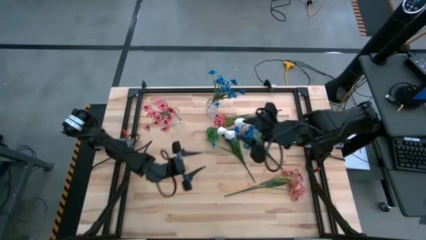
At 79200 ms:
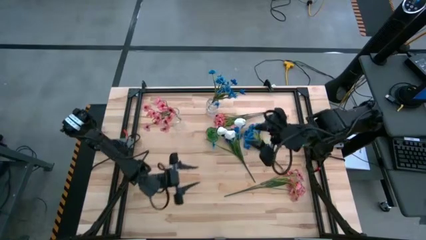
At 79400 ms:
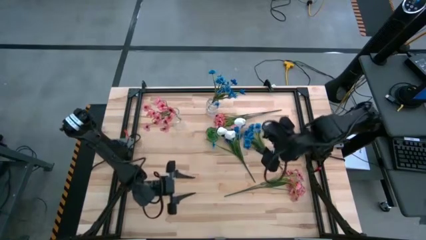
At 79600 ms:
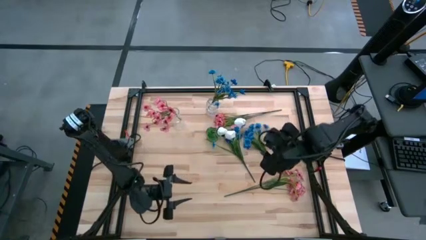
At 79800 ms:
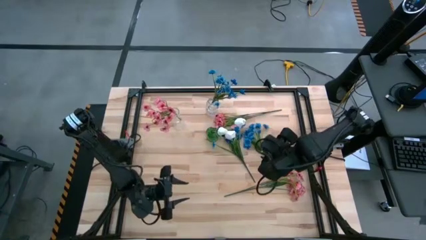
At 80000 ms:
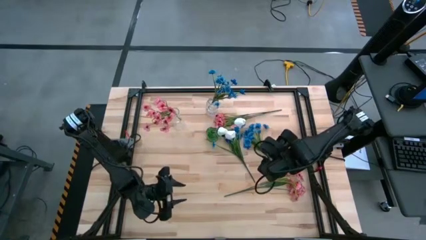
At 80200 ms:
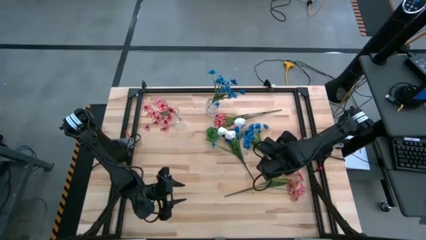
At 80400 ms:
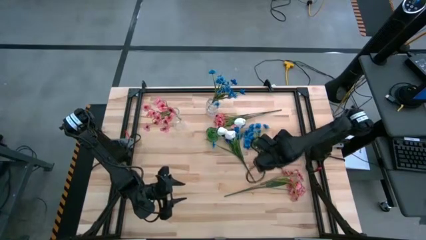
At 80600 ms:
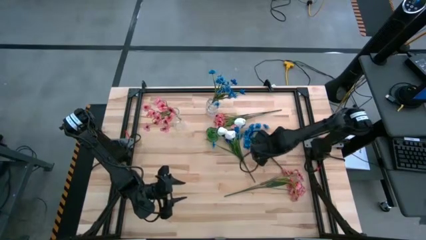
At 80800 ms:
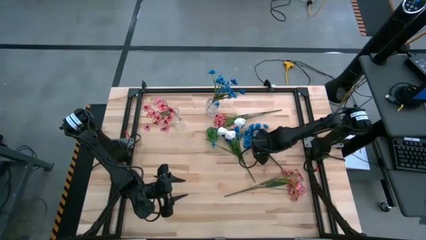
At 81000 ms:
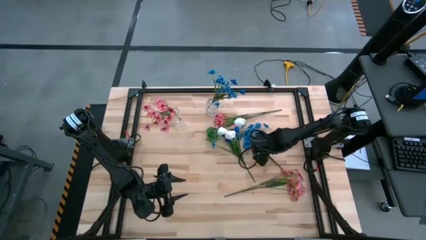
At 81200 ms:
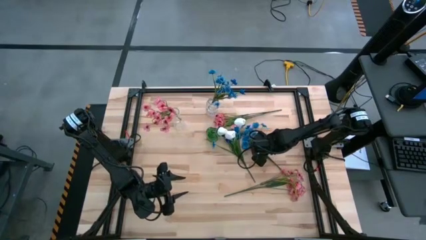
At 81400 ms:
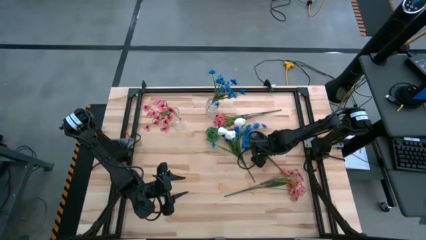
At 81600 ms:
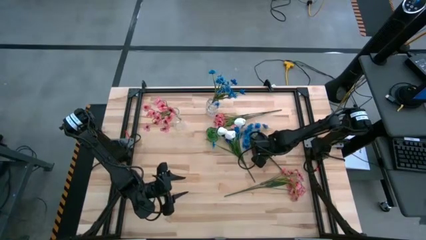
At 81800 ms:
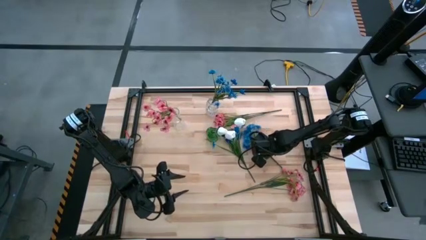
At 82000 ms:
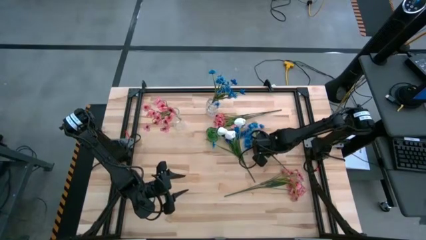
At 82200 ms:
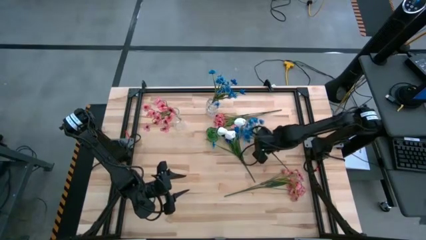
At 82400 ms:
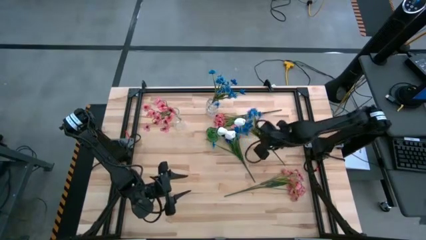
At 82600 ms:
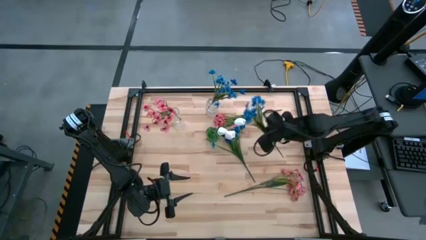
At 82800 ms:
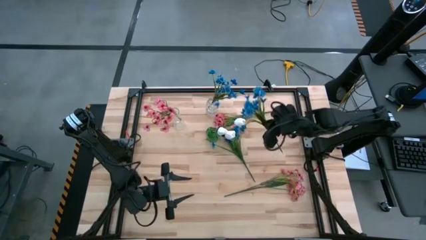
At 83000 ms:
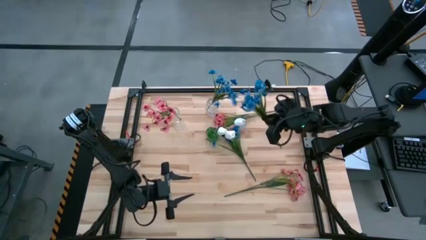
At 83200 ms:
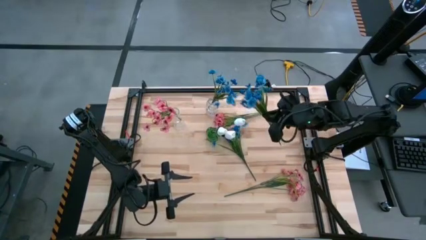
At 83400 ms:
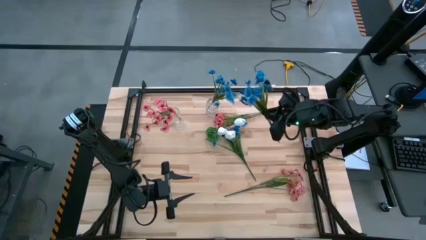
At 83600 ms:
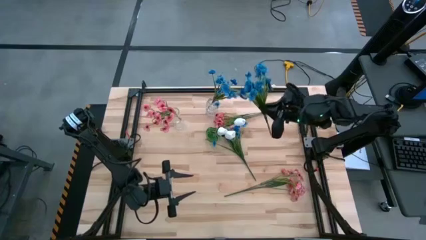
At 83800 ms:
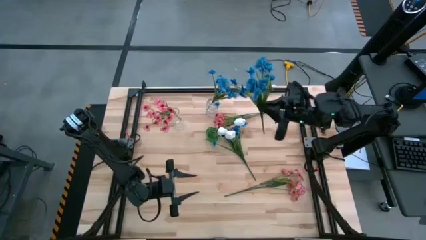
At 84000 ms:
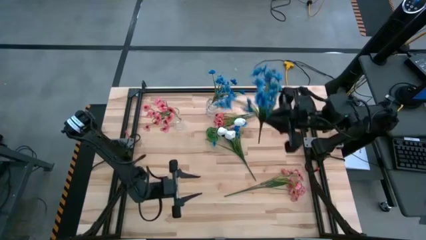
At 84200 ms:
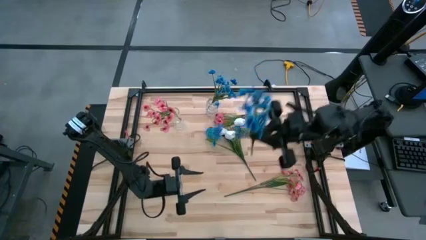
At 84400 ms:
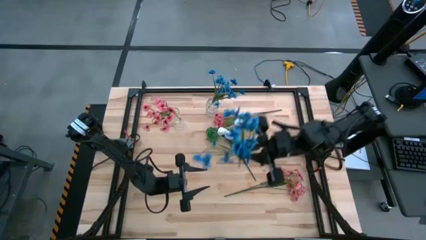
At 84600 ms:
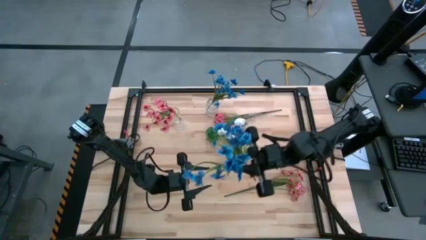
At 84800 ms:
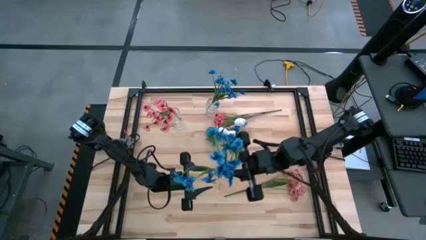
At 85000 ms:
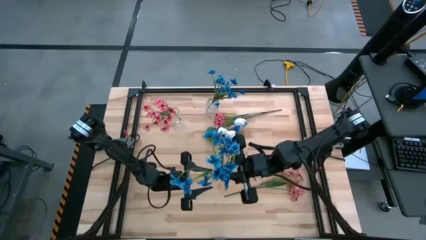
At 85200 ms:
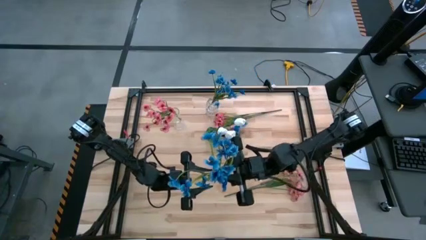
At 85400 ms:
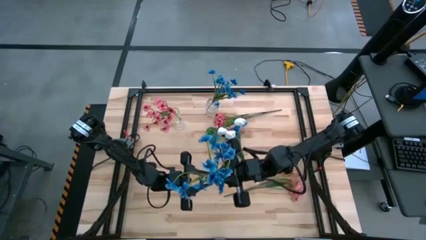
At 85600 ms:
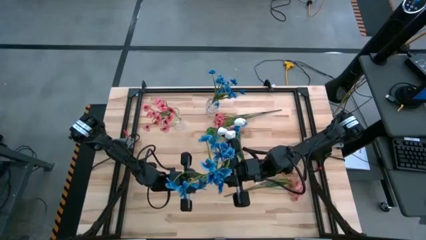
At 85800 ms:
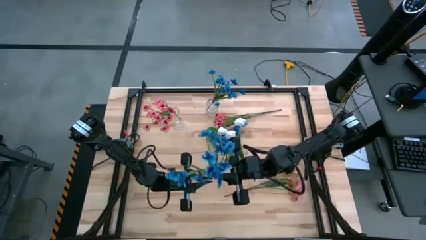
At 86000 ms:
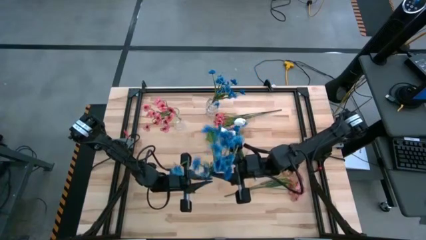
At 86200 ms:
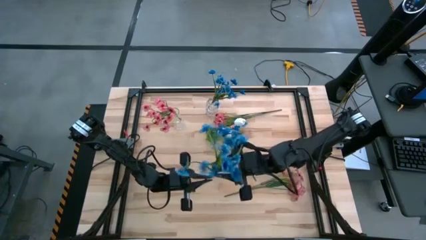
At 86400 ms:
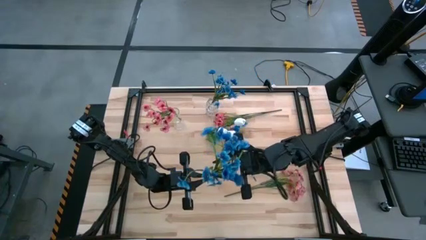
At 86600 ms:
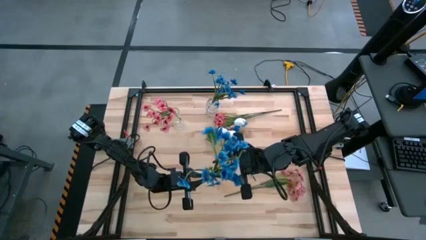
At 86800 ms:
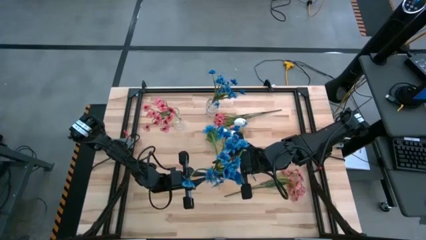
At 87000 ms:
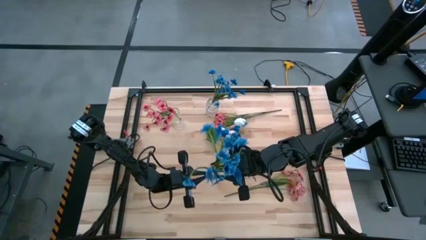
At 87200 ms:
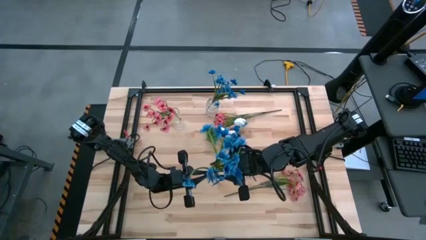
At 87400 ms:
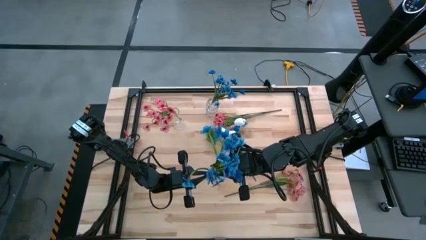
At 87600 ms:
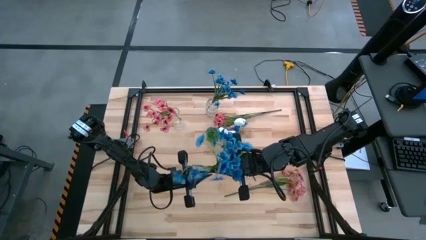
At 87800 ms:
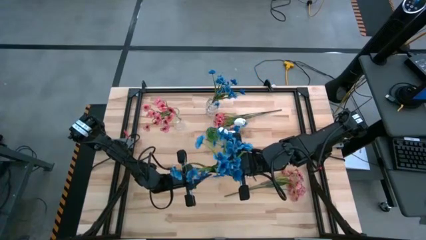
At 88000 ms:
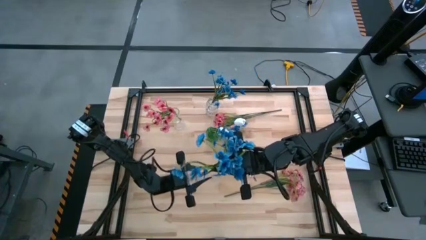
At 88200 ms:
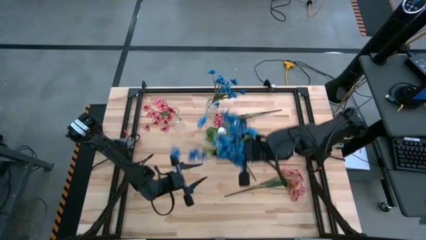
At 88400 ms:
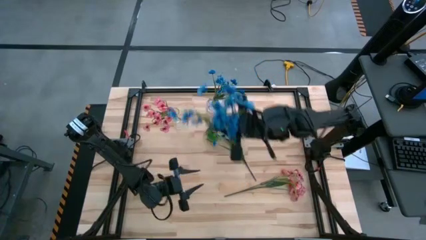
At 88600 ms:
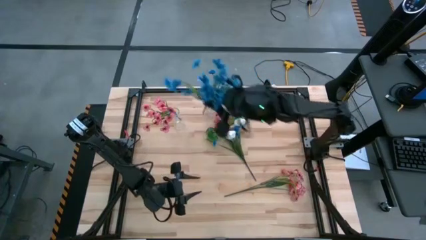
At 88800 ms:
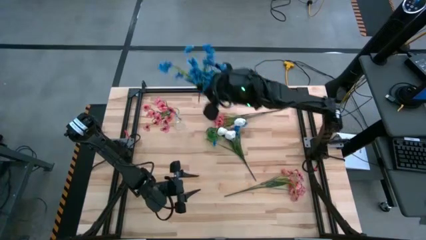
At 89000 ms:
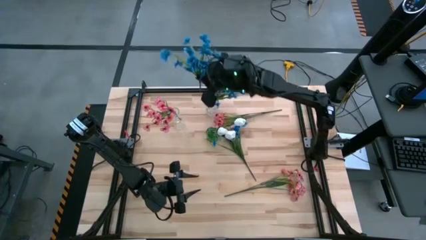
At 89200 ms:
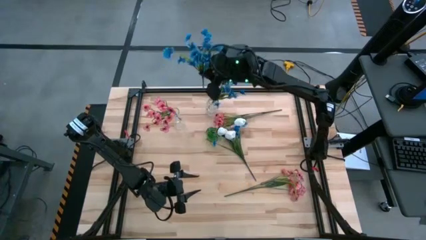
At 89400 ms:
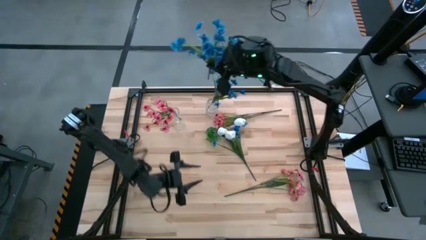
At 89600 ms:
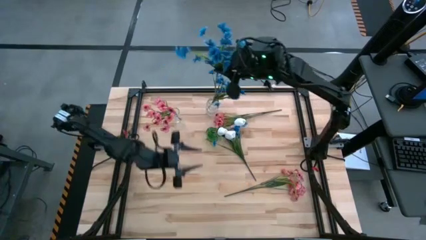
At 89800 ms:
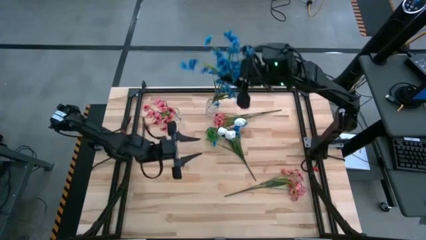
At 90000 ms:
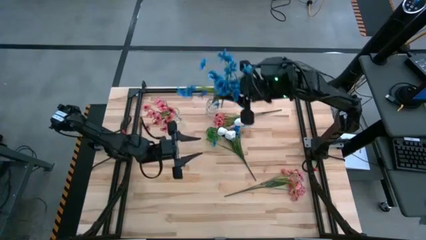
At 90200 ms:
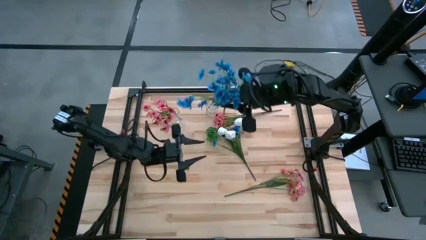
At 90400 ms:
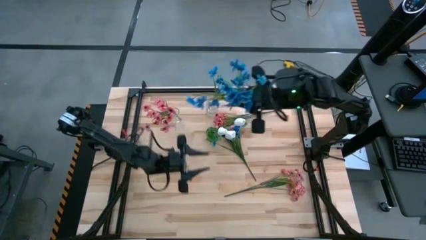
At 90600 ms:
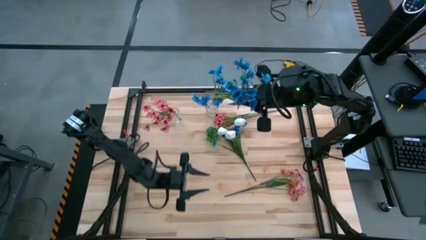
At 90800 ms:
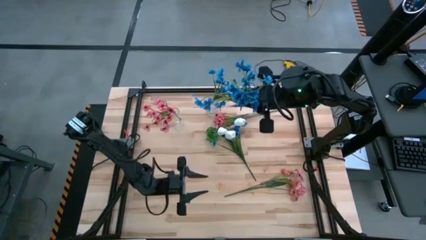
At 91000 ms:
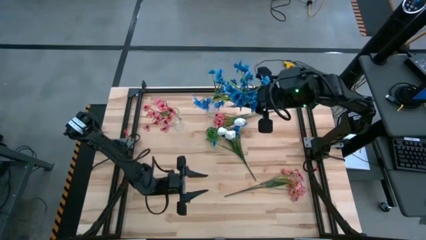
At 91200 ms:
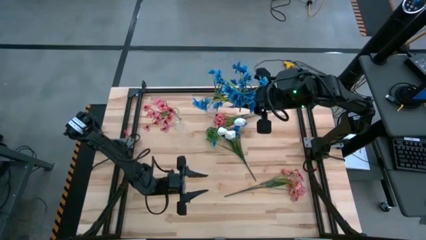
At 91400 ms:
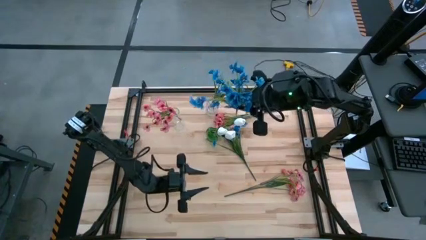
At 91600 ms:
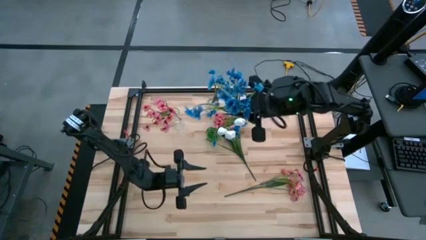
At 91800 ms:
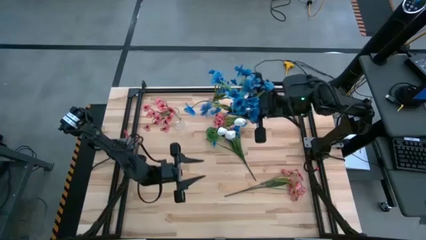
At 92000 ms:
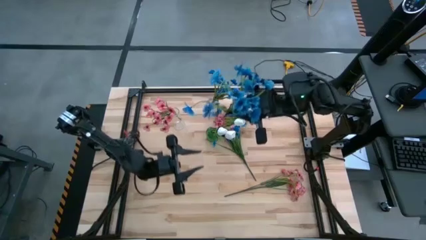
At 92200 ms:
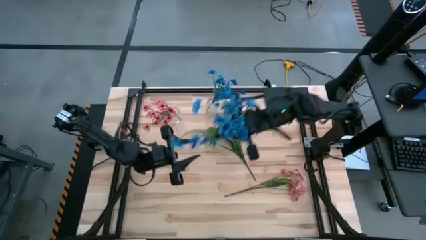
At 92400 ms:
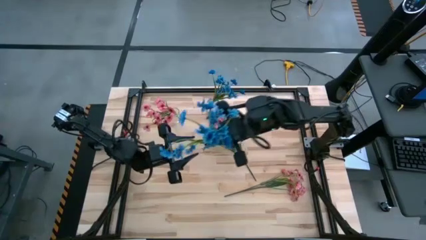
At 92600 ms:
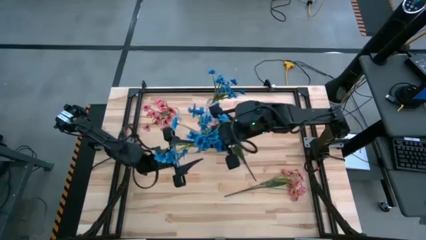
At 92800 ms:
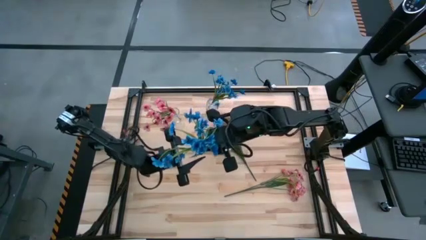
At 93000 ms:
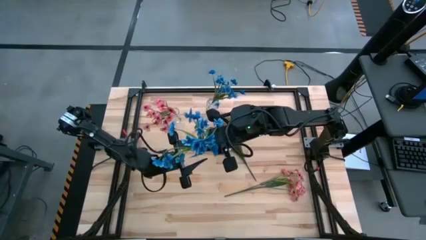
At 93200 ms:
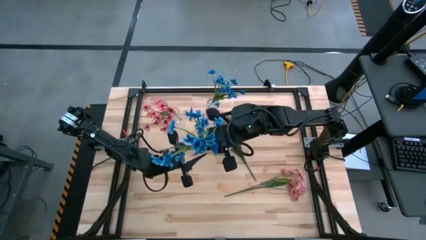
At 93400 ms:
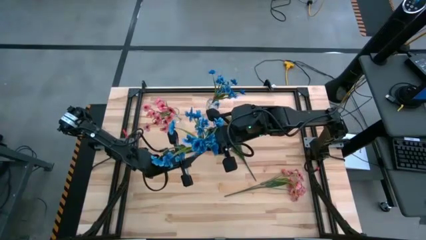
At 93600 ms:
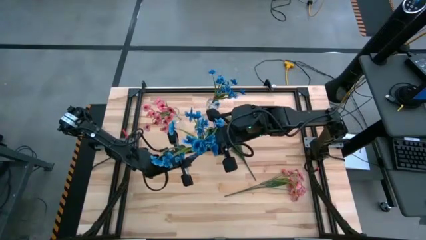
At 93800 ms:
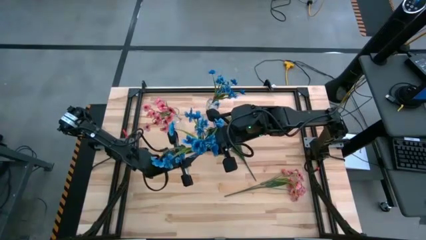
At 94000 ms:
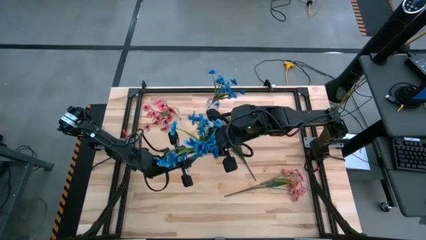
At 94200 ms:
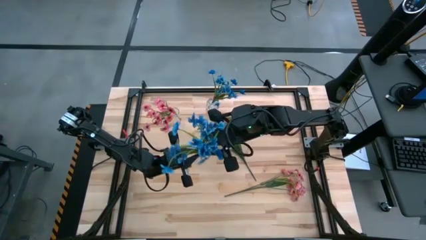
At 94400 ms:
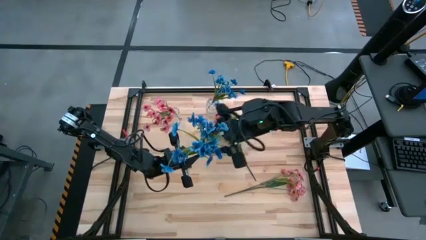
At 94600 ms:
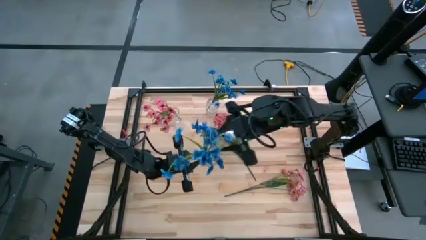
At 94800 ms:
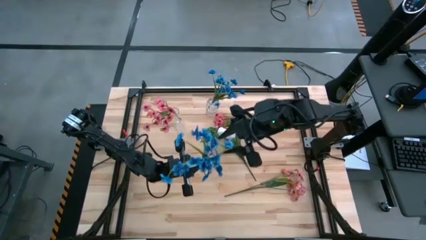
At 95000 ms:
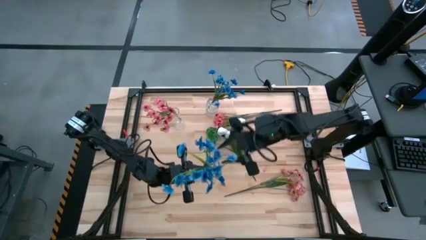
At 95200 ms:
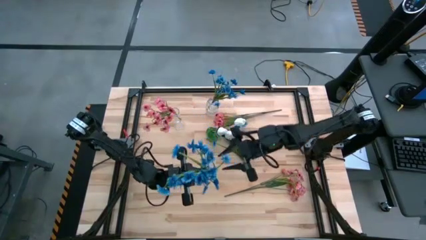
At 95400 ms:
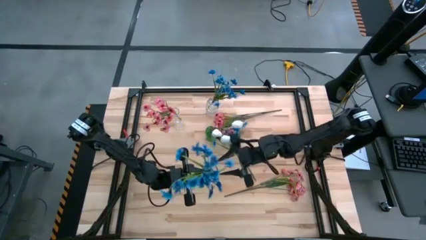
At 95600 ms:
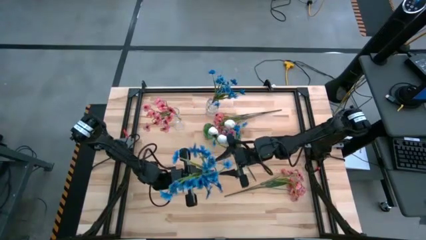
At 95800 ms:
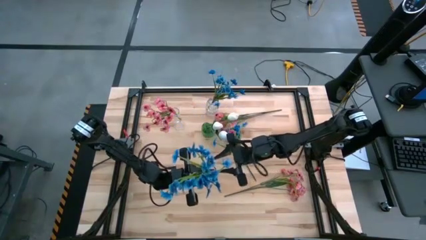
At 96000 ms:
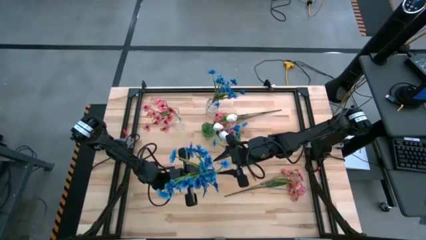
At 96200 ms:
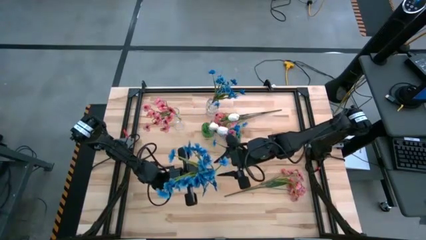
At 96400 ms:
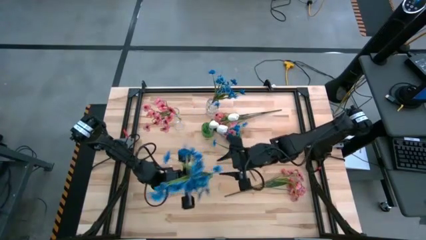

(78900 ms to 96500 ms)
Task: Sort flowers into vase by color
Put the right blue flowers into the right transparent vase
